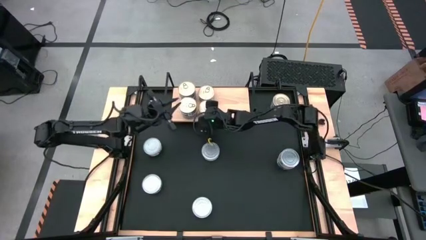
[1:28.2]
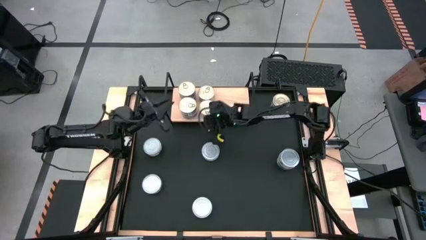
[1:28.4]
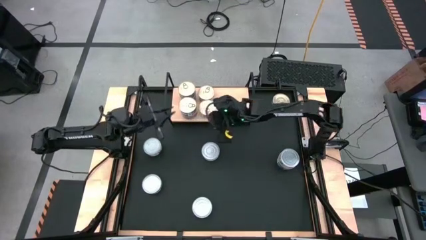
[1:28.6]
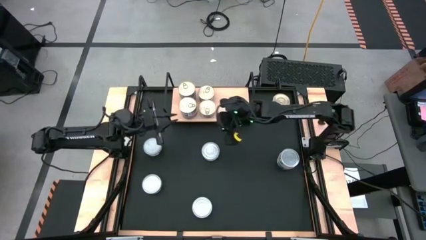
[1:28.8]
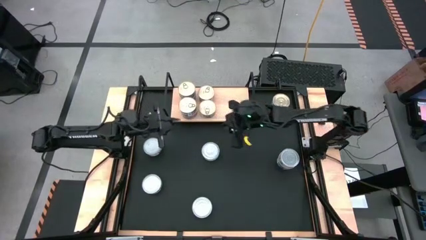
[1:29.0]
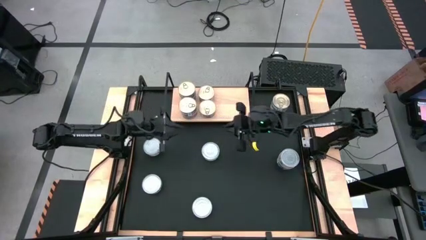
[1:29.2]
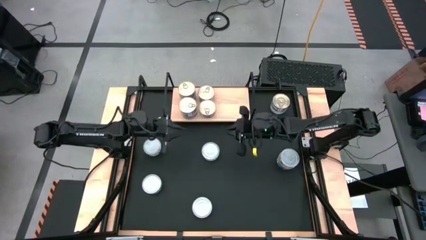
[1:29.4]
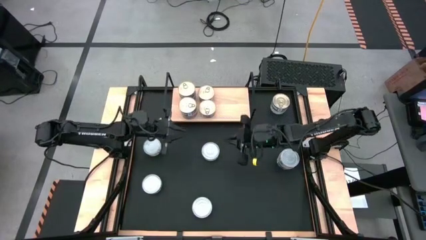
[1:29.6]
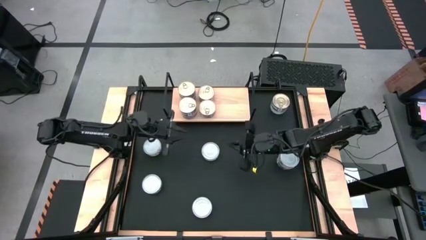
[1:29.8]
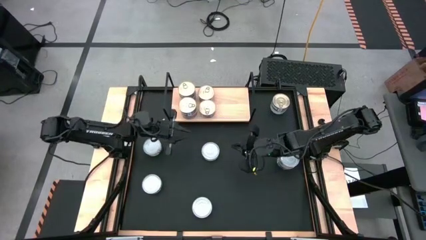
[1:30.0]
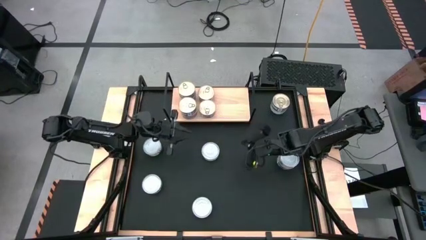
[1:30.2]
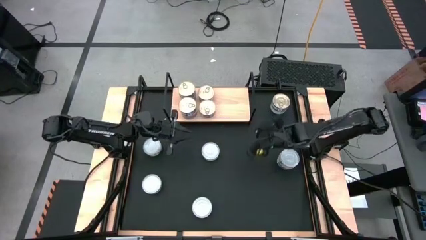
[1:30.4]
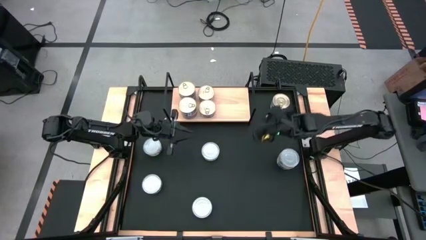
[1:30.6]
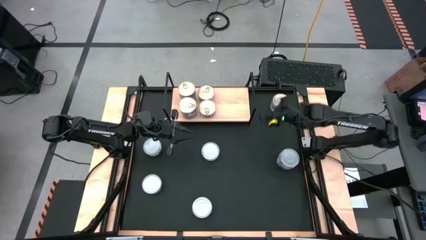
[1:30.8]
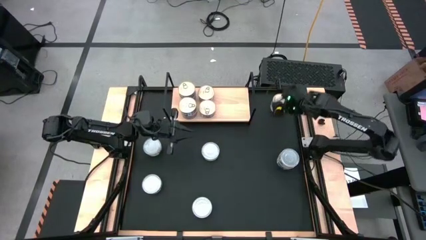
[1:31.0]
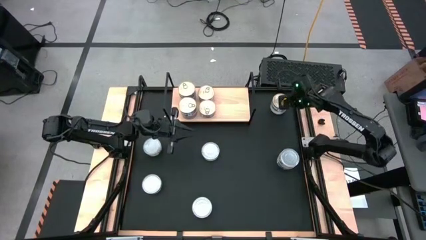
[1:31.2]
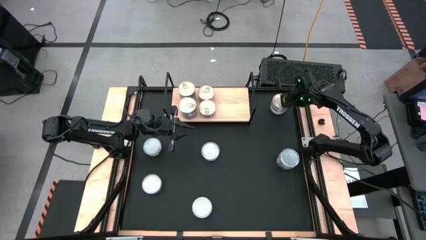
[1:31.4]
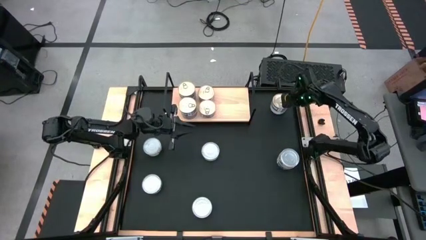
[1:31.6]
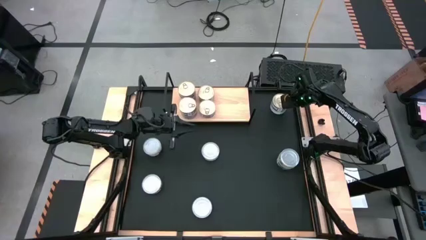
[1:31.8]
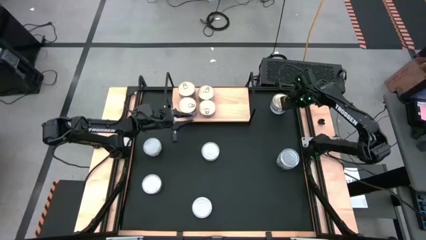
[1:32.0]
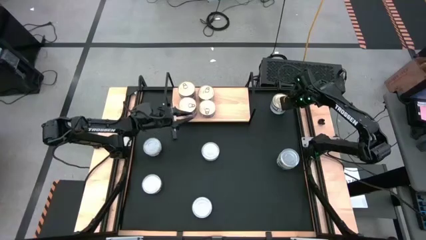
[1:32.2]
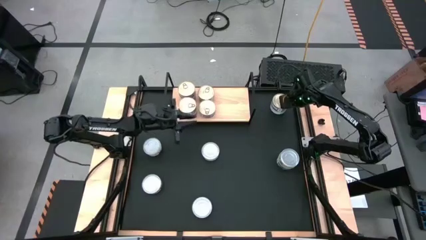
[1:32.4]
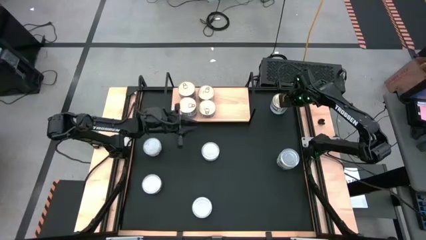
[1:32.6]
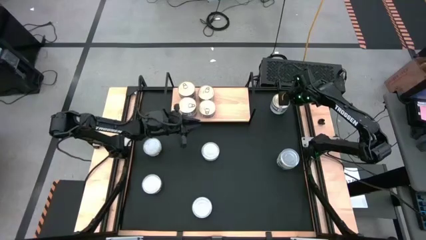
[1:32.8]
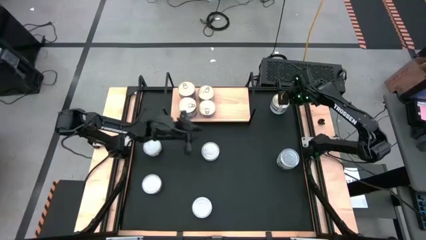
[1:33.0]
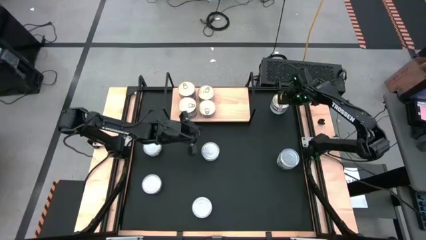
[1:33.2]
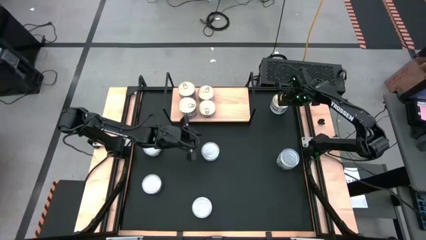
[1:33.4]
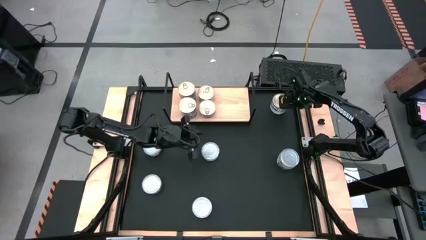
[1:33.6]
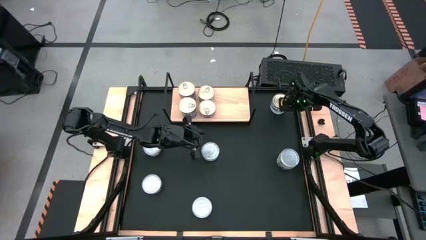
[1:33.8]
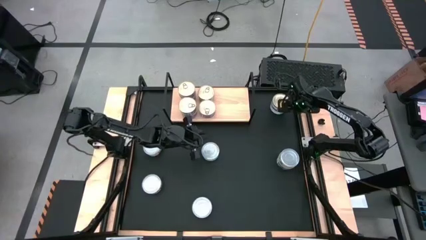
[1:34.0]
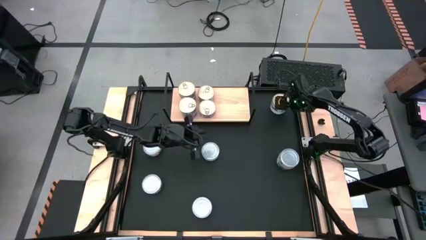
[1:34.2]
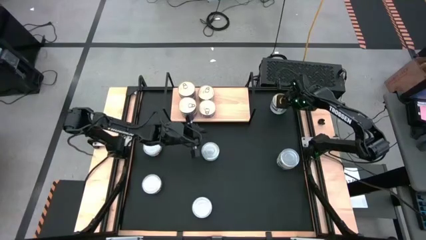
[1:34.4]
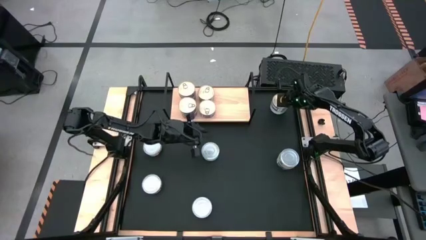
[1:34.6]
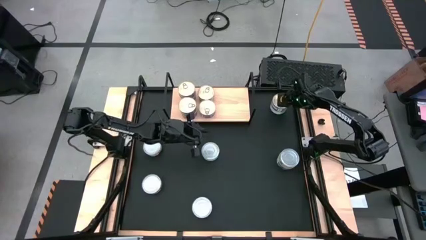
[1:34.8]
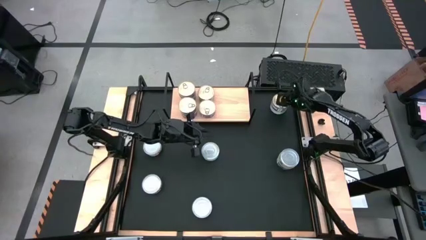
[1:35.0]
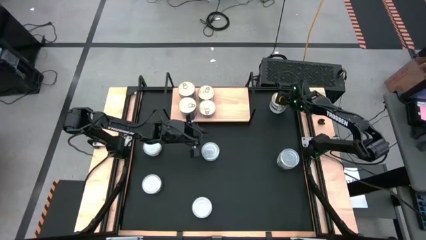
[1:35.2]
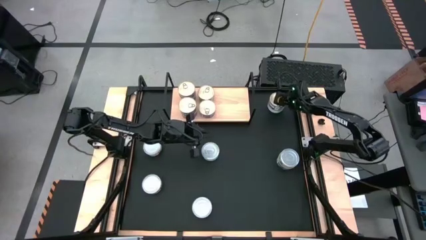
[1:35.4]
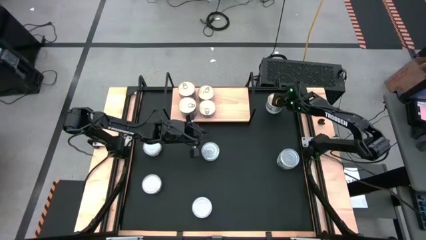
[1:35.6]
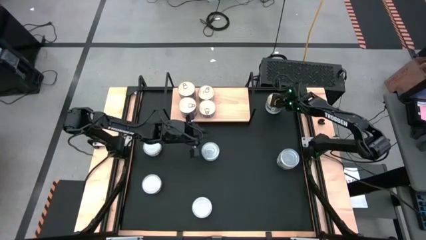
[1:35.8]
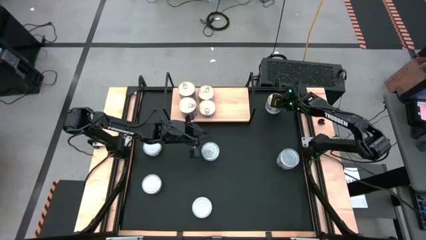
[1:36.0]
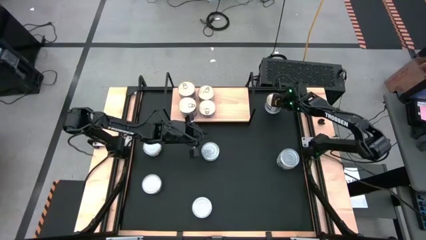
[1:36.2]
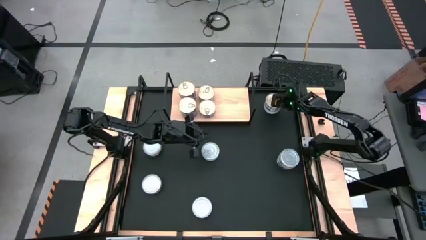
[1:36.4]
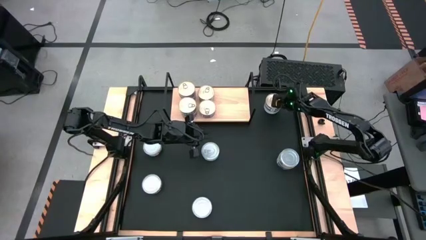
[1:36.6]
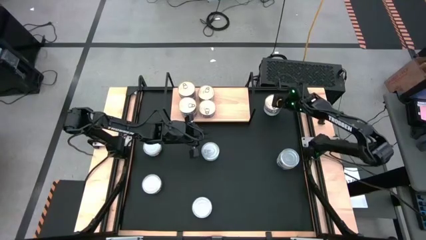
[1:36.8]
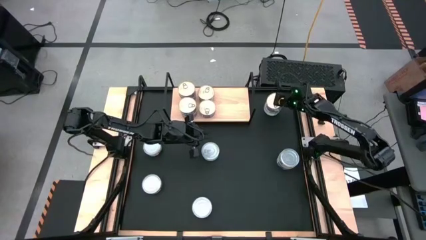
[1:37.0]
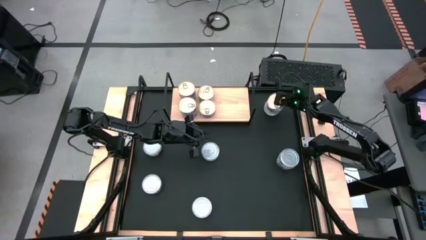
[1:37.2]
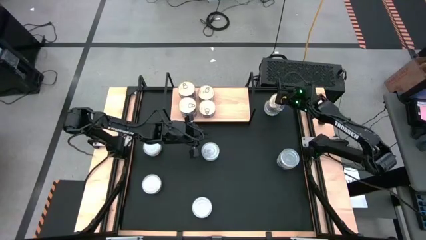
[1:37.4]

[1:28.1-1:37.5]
Task: Stack canned seafood by type on shelf
Stack the blue tuna can on top of the blue tuna can on the shelf

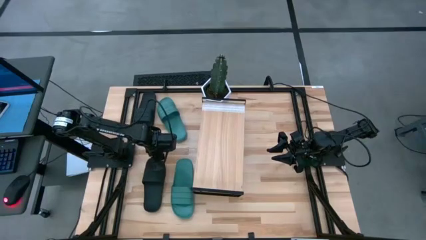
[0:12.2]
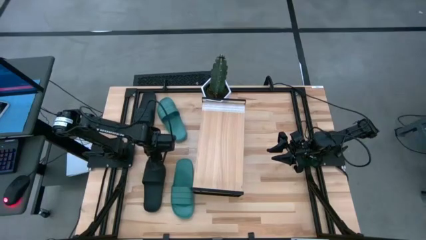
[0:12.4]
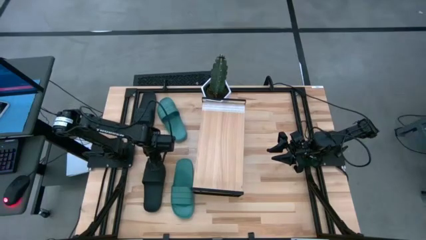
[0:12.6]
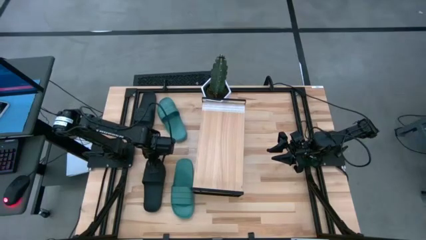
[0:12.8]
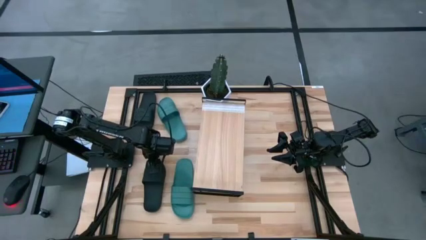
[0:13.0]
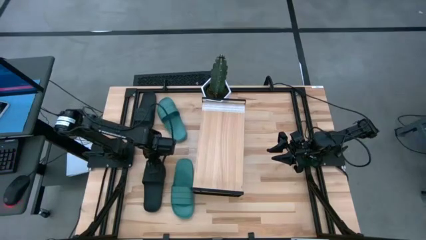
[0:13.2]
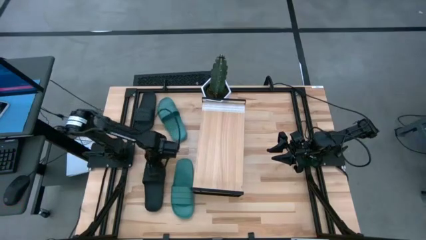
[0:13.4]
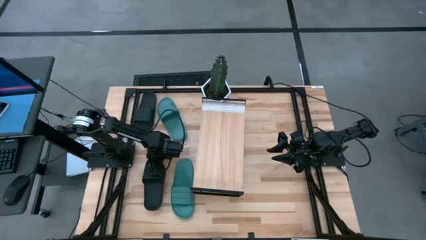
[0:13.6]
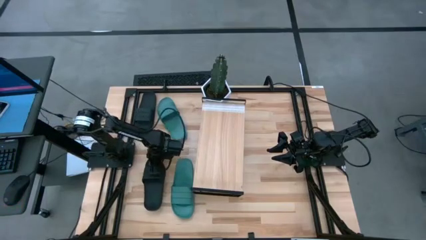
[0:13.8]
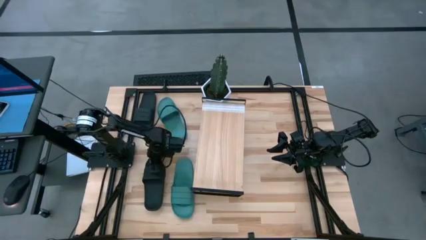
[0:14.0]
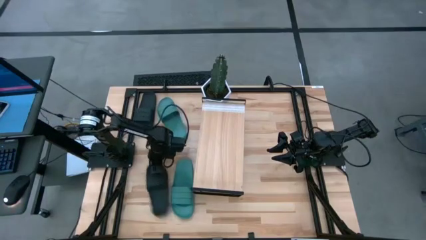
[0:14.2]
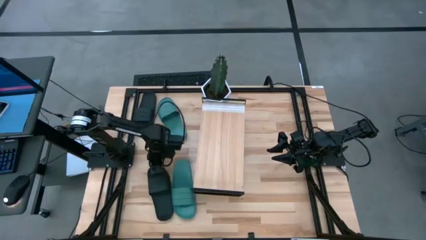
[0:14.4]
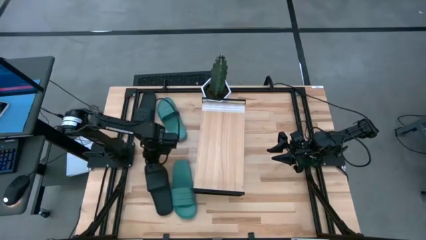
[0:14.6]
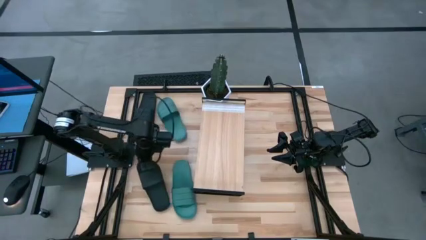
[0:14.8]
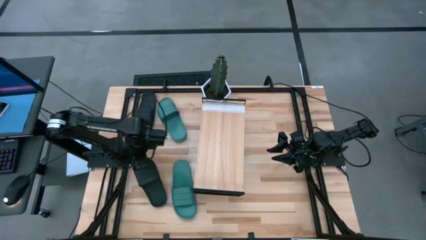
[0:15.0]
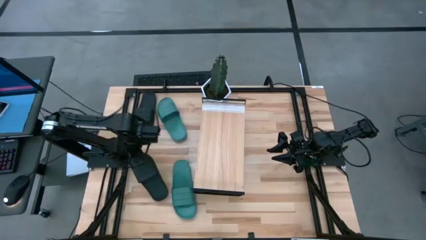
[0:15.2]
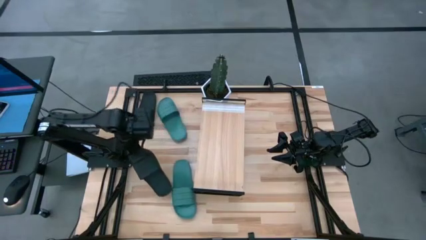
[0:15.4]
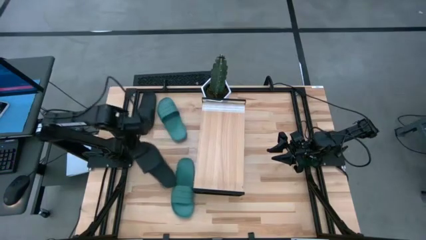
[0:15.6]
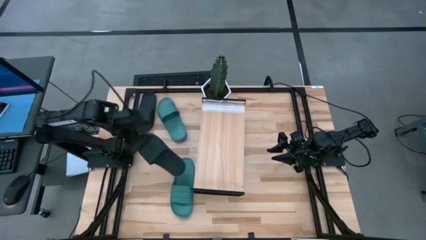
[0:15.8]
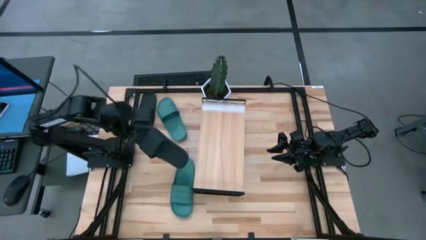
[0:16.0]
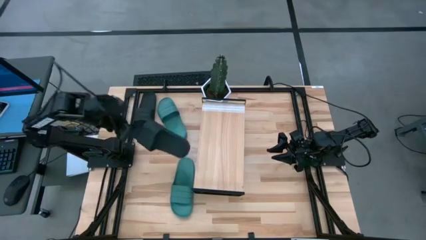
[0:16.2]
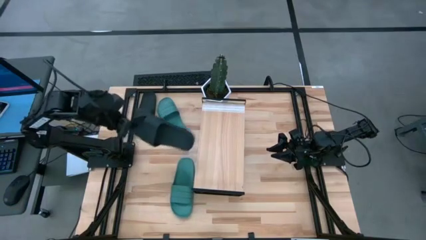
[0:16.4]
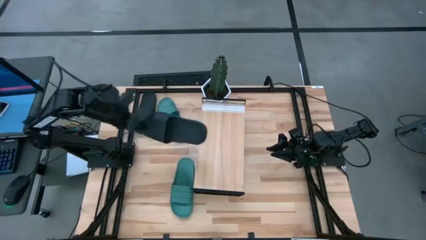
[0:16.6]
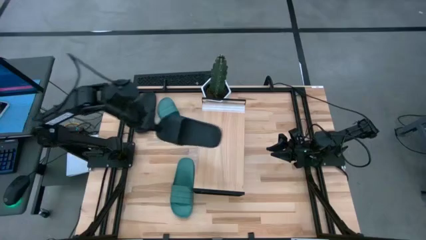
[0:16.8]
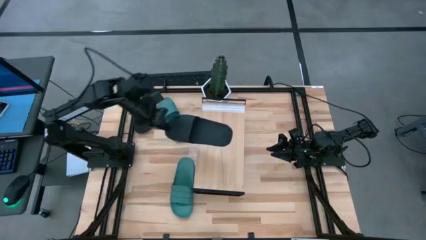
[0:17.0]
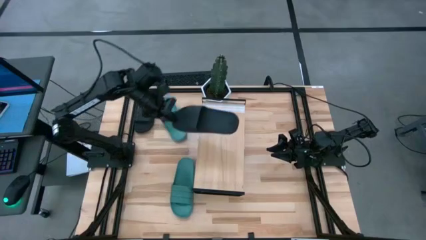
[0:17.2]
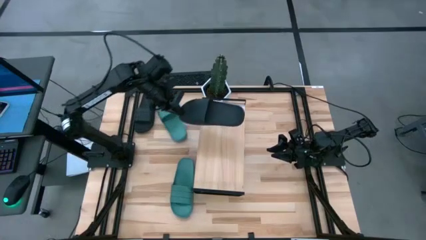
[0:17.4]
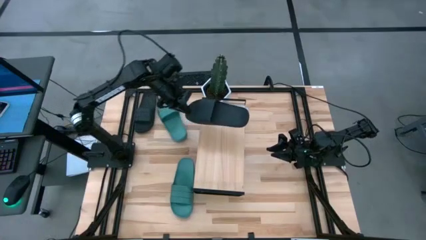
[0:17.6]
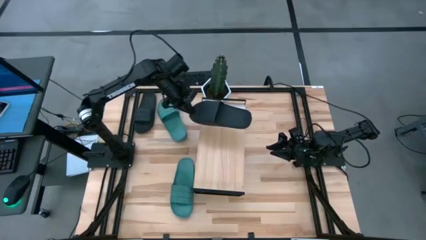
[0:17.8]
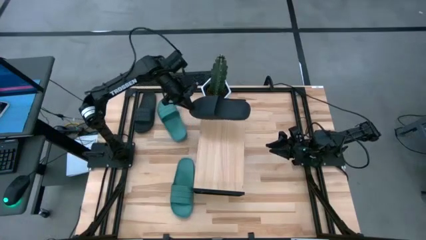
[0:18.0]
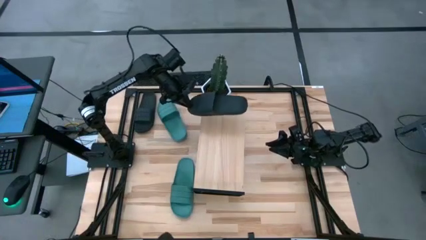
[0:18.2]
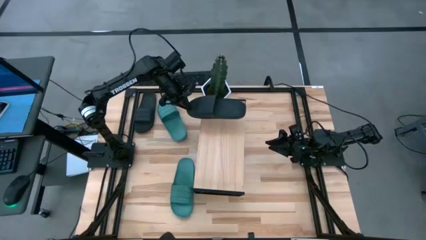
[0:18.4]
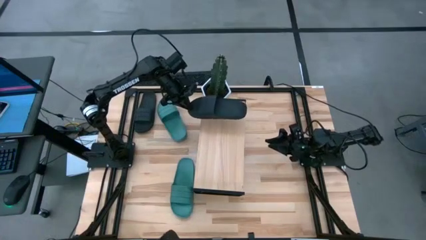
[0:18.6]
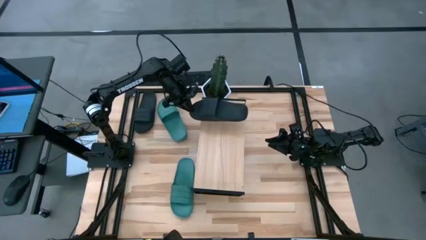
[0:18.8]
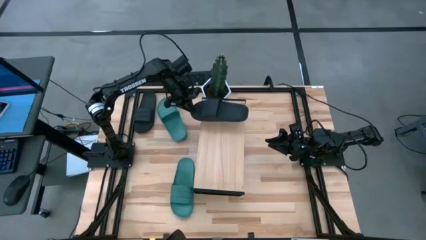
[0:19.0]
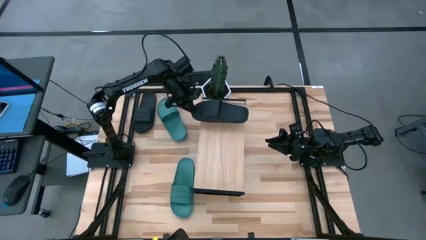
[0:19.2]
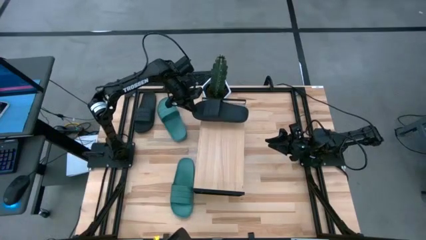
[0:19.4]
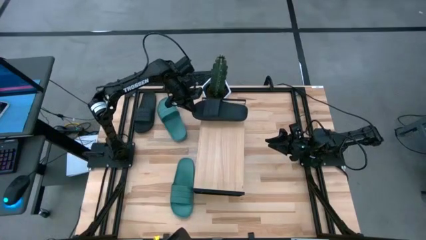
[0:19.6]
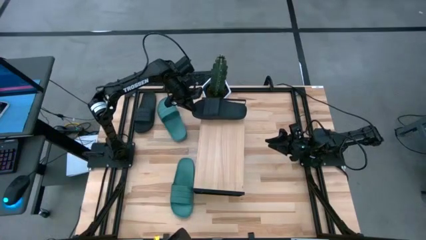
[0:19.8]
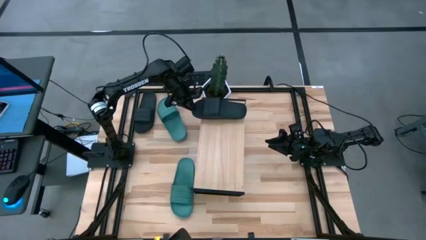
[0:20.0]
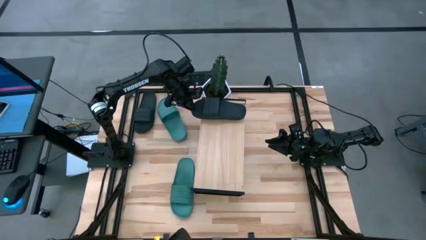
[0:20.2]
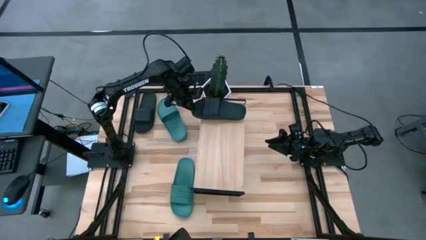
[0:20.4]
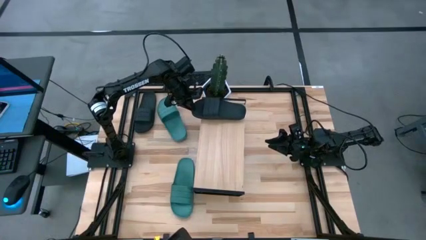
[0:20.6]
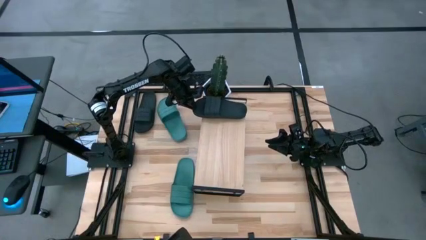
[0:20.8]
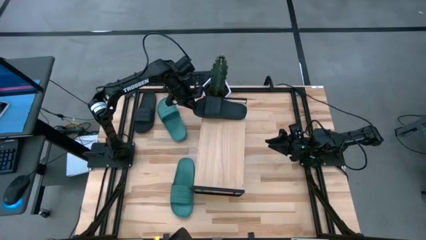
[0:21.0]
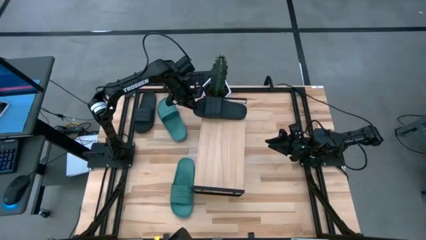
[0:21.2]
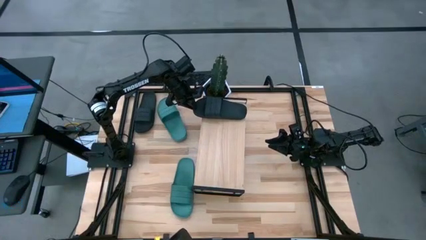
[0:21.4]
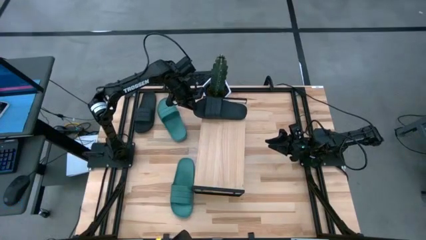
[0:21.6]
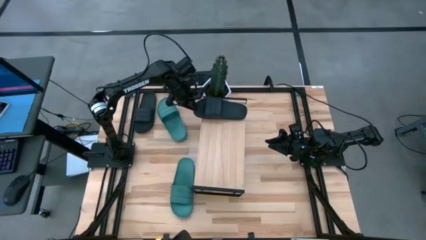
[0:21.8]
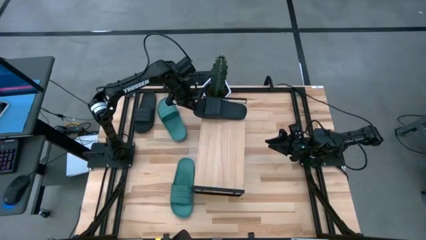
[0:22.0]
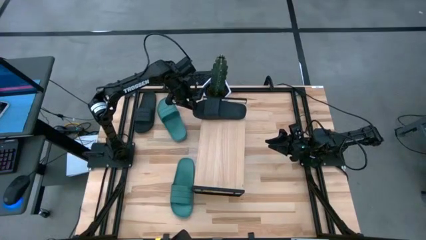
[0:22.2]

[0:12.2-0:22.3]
Task: Pick and place slides into the shelf
Put the bottom black slipper on the shelf
